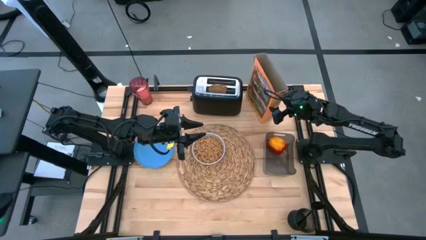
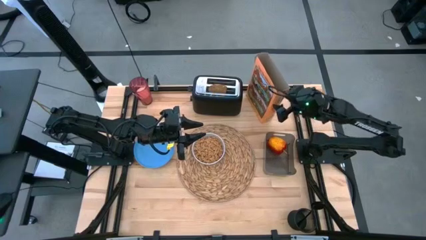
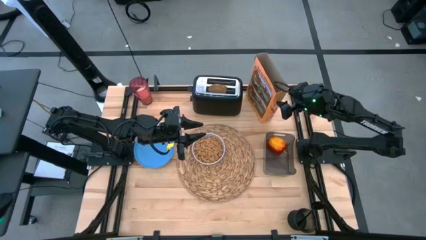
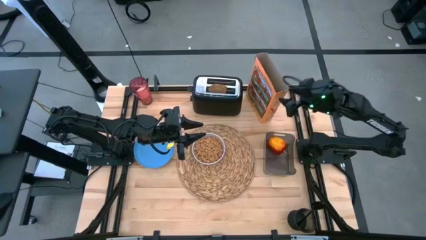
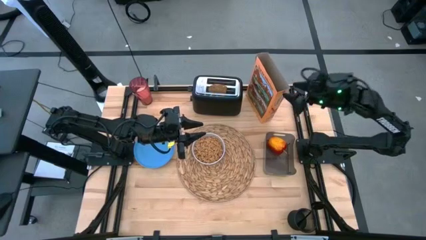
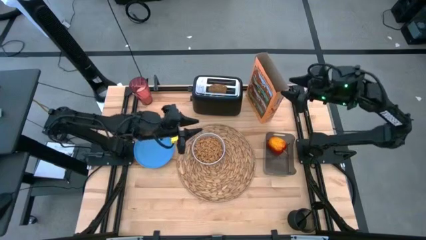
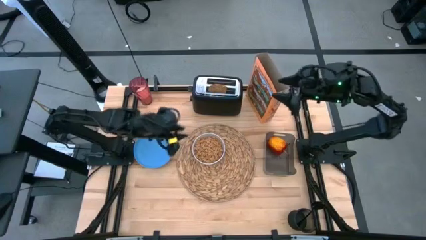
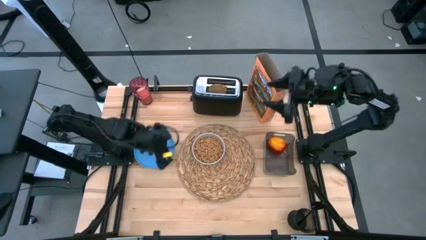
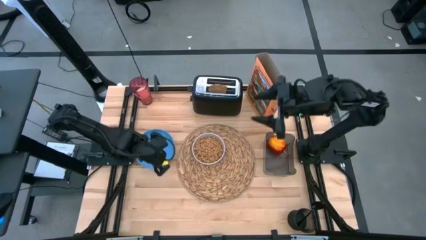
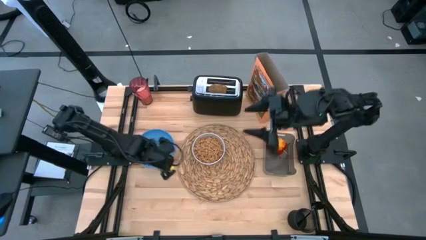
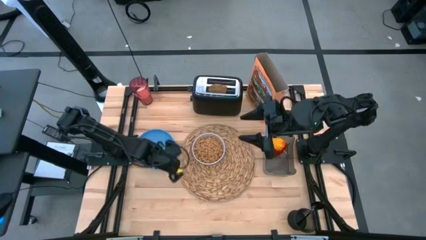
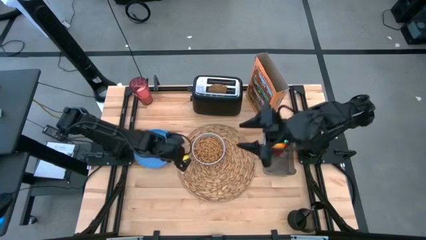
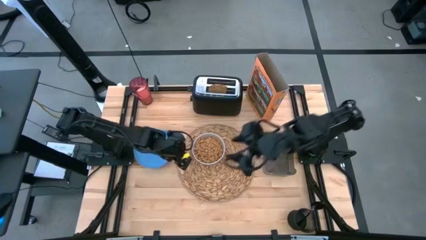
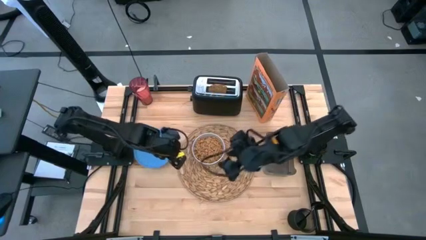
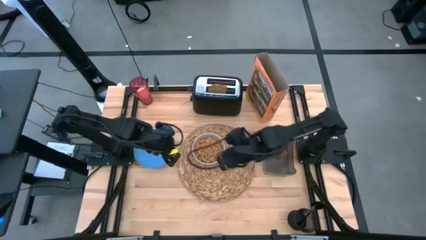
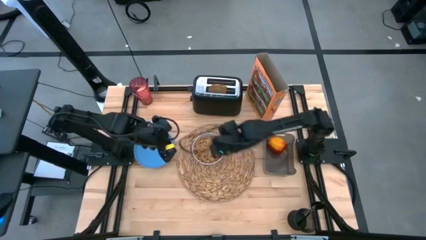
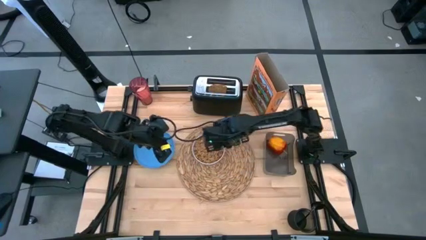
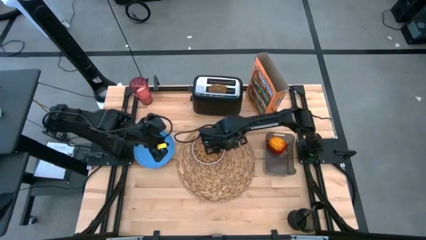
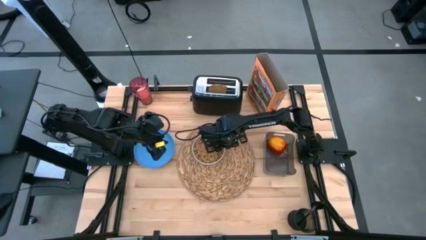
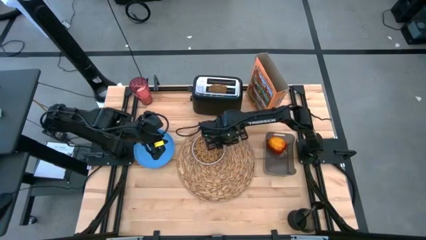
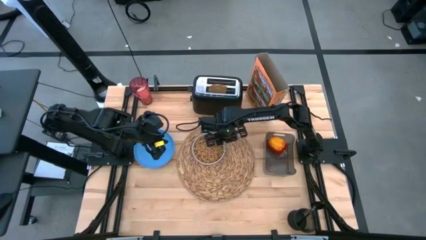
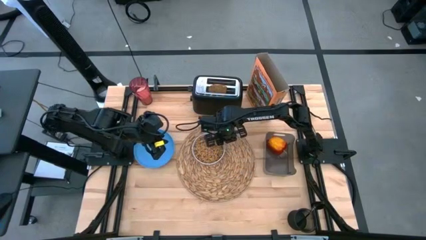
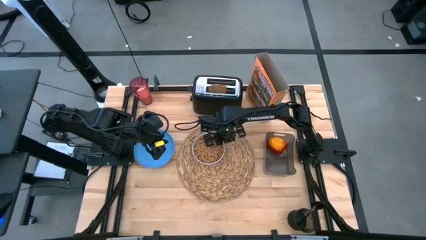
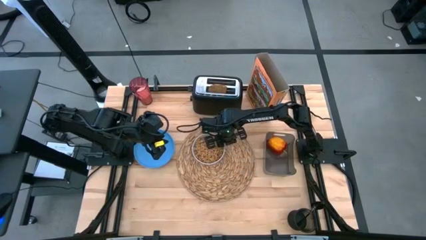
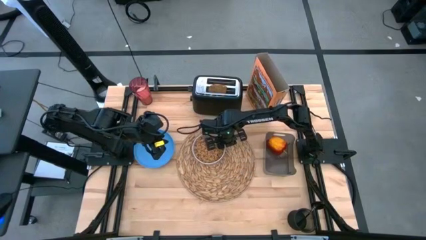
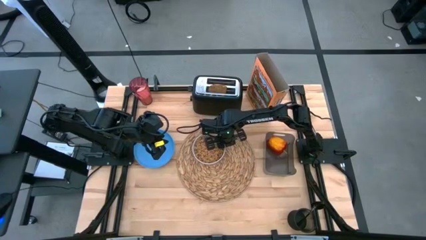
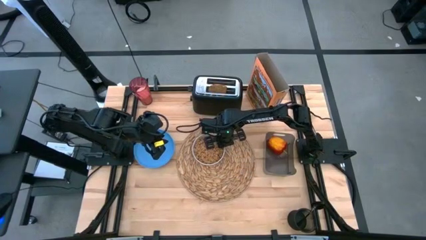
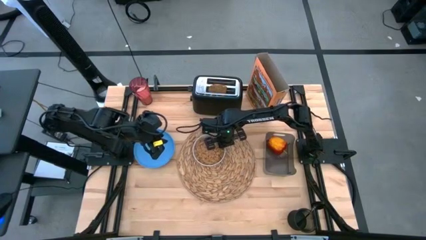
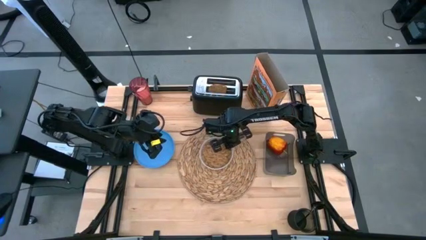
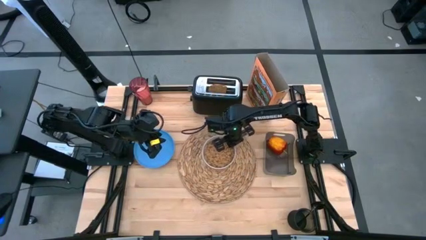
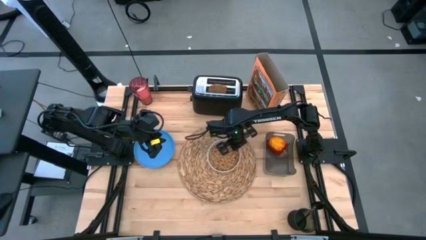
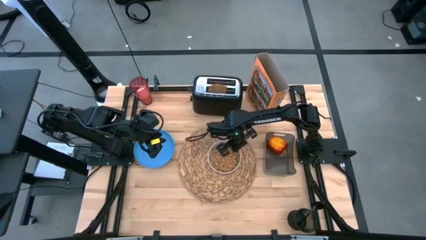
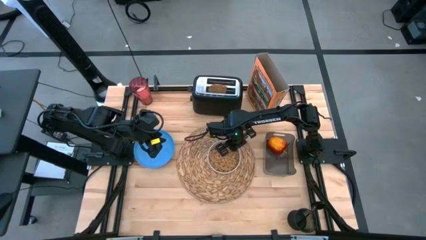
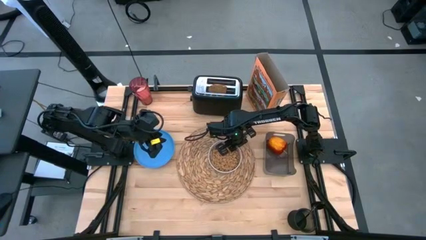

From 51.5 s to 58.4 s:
Task: Arrange a breakfast setting
Adjust the bowl on the center right of the table mat

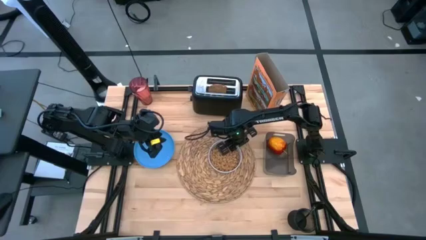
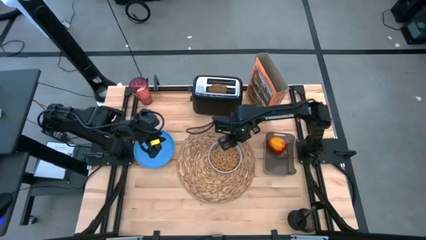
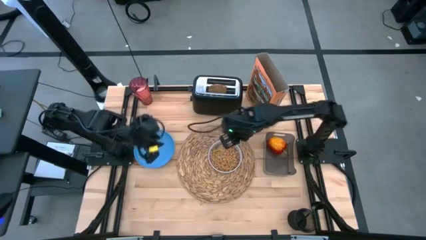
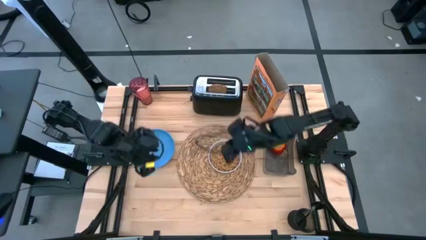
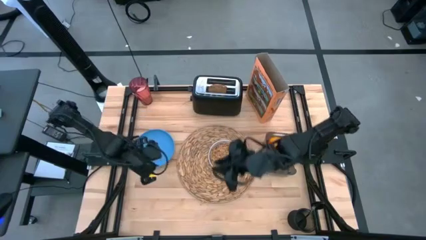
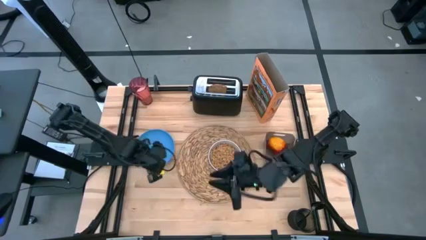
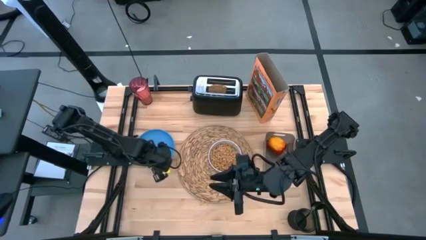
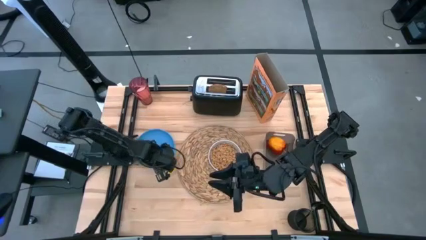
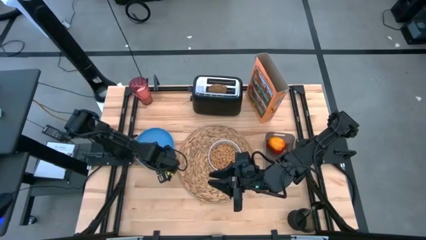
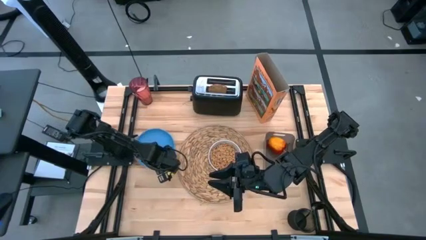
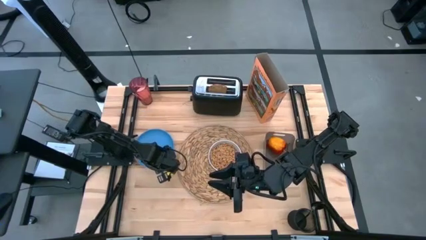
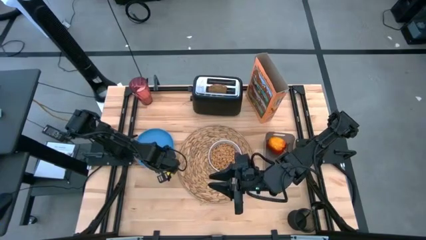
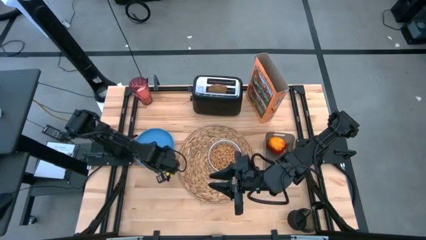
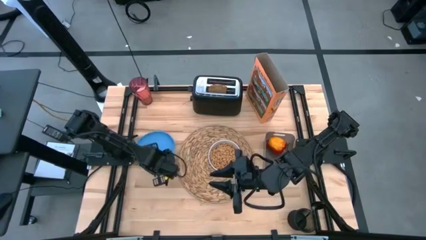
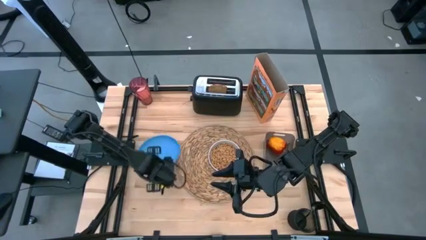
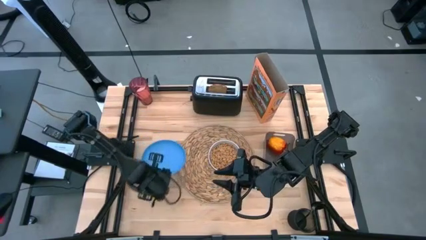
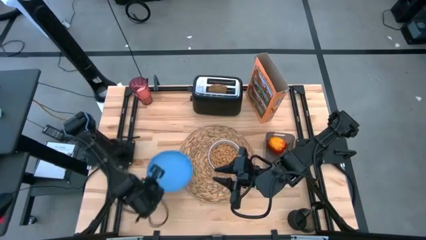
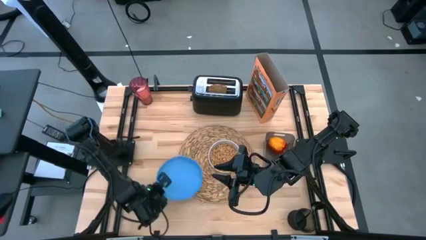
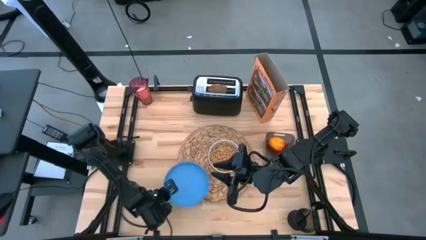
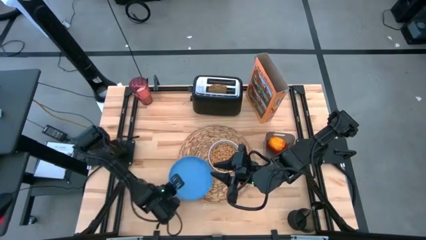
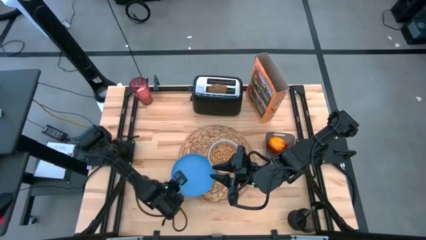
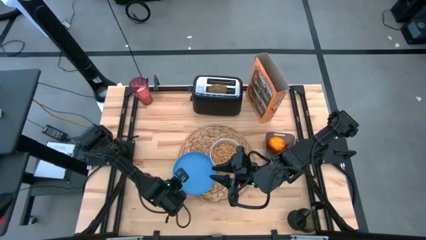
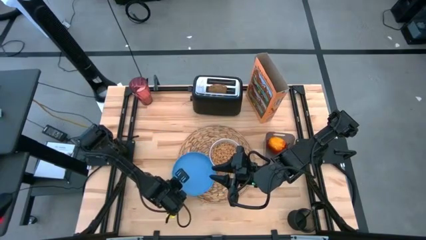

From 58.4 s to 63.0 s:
Put the blue plate on the bottom left side of the table mat

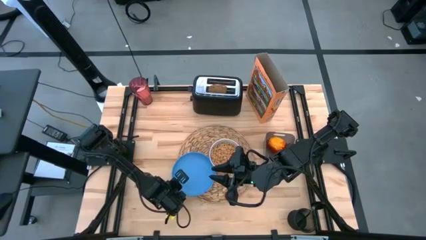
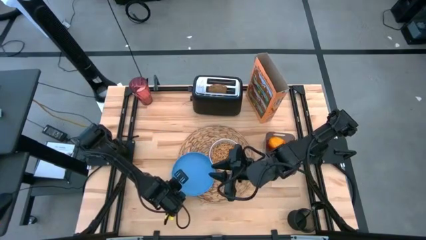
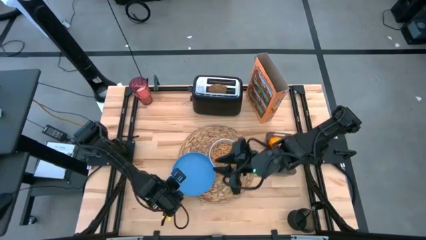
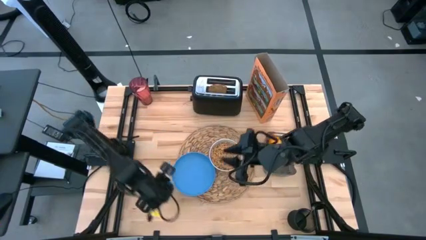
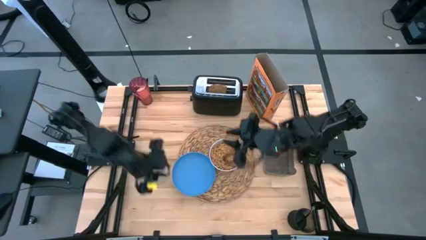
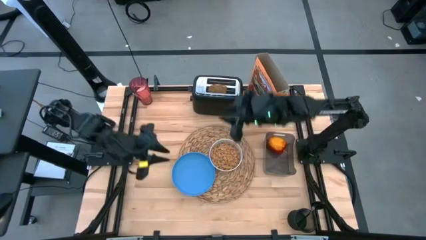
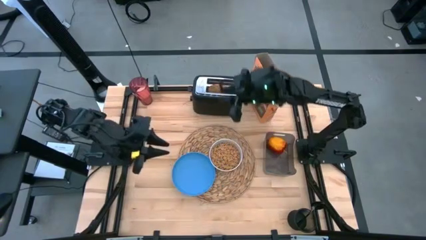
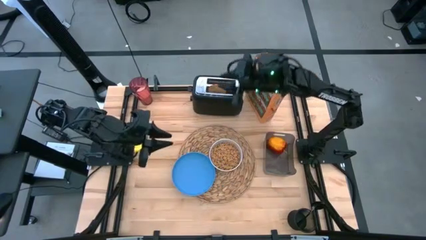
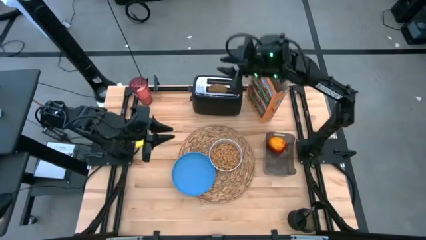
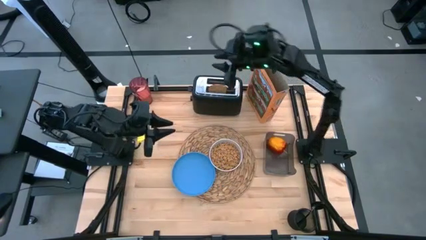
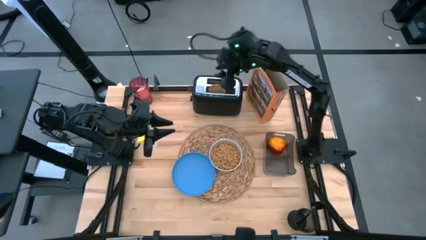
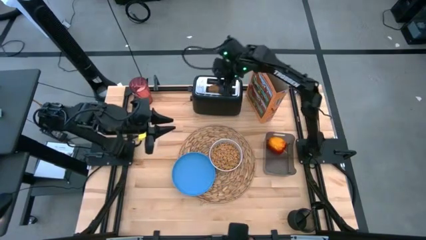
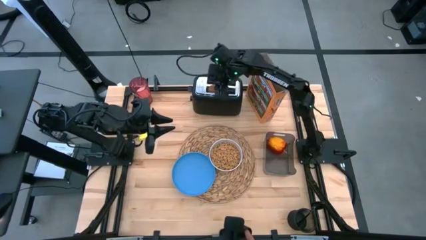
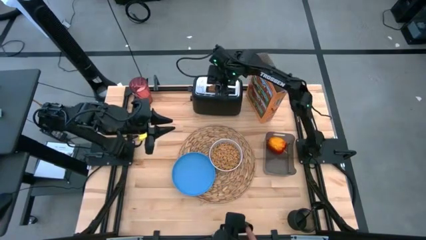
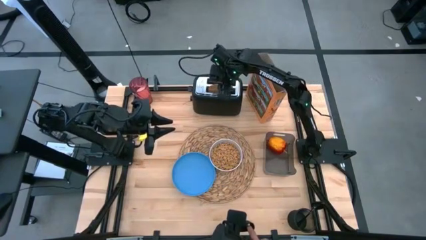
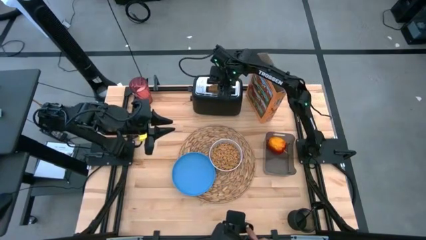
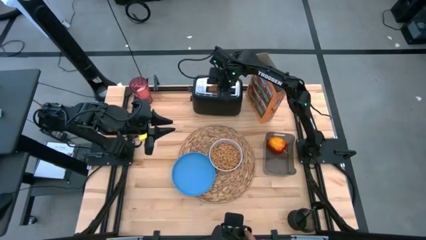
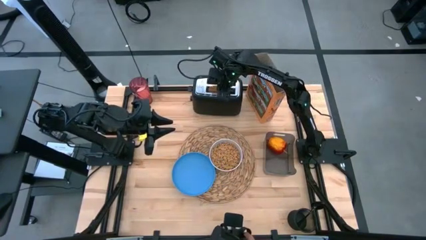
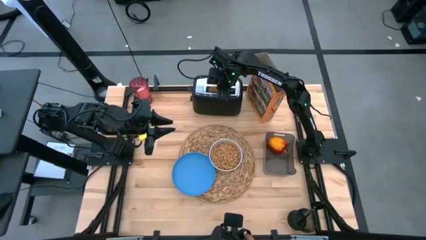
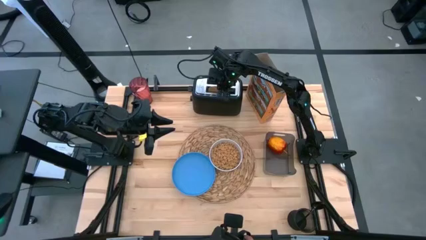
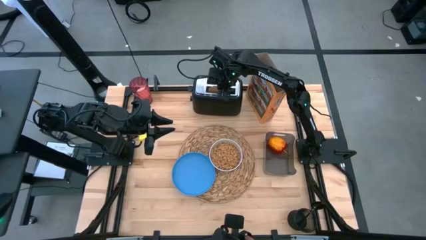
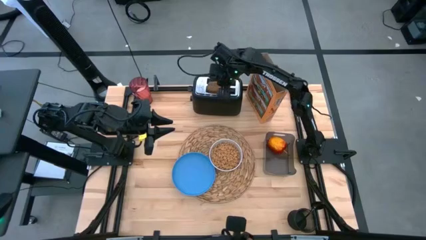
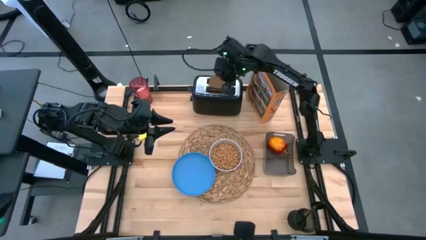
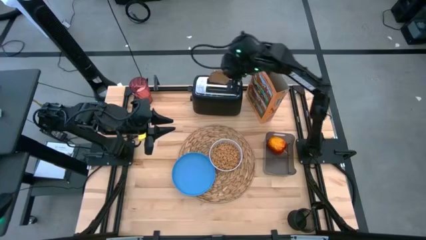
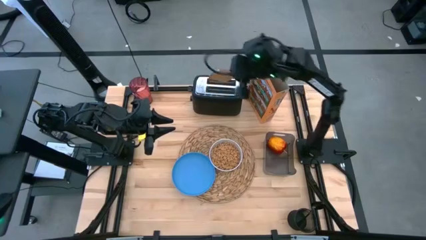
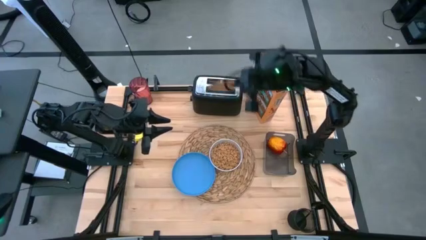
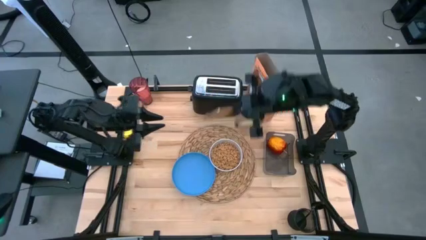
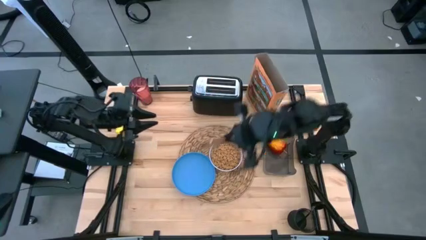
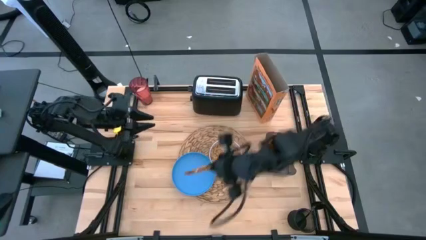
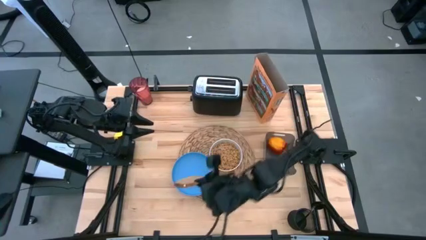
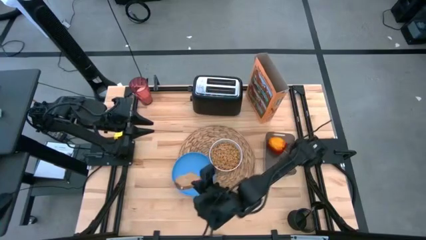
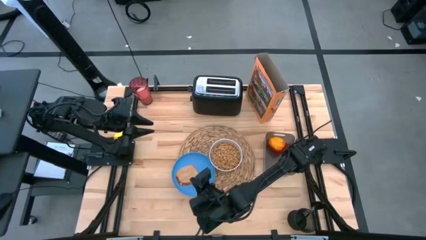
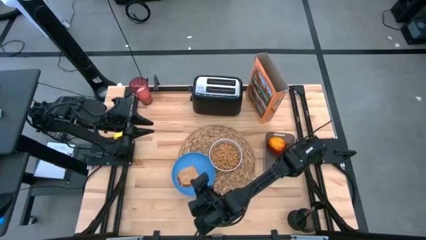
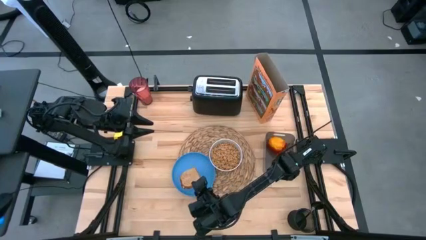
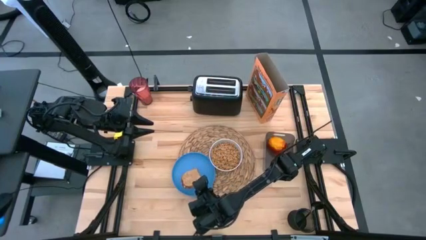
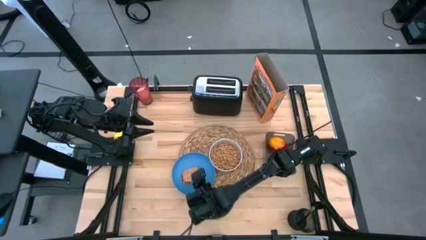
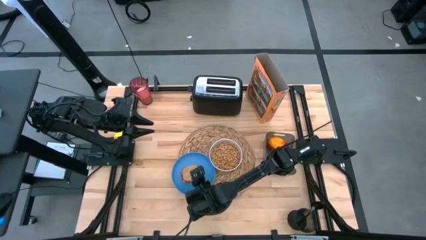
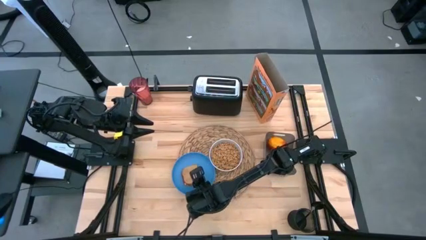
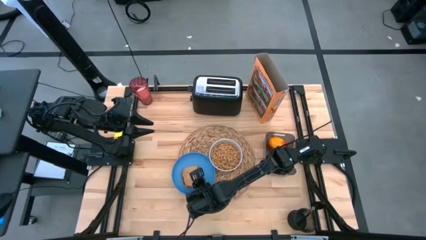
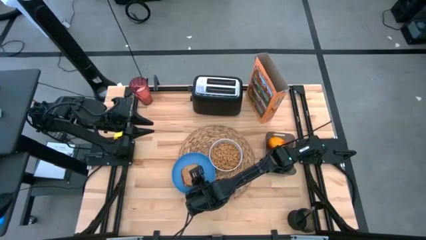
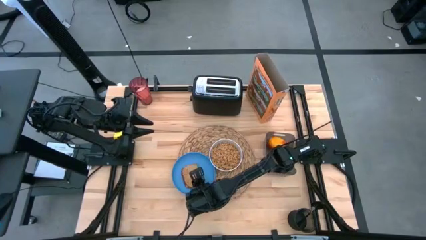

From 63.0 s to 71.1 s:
Put the toasted bread from the toaster on the blue plate
